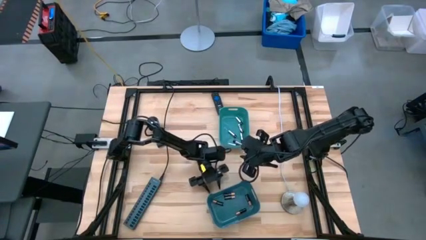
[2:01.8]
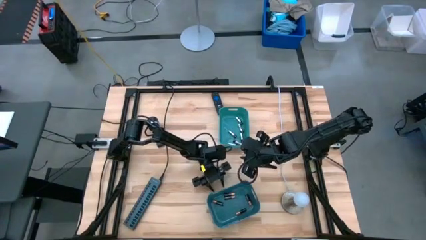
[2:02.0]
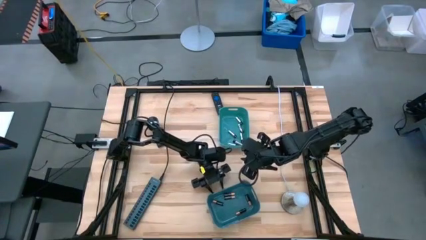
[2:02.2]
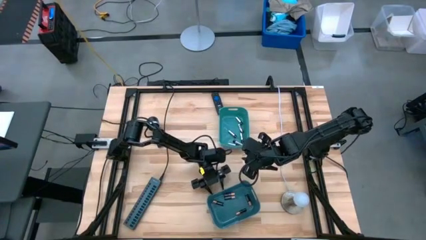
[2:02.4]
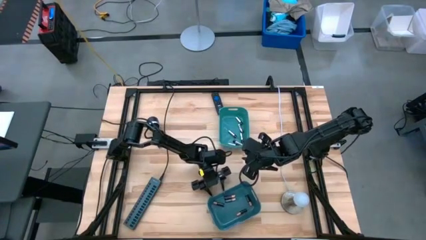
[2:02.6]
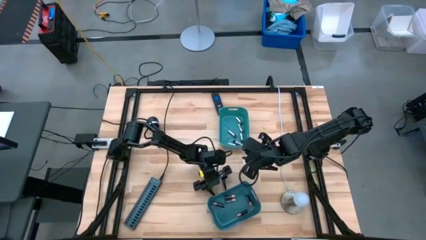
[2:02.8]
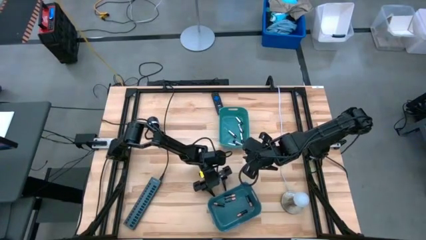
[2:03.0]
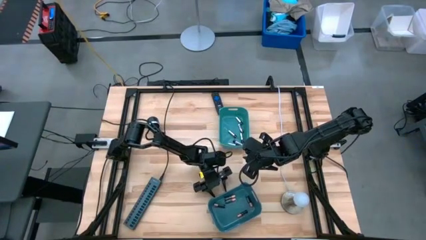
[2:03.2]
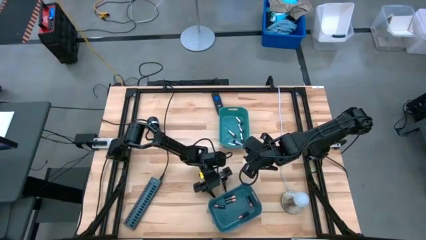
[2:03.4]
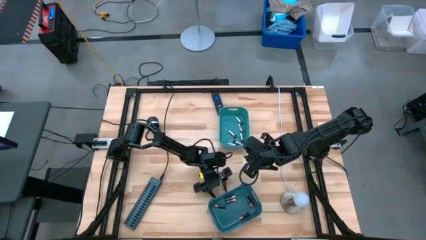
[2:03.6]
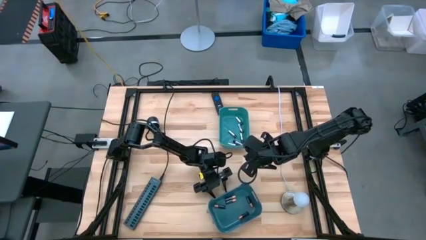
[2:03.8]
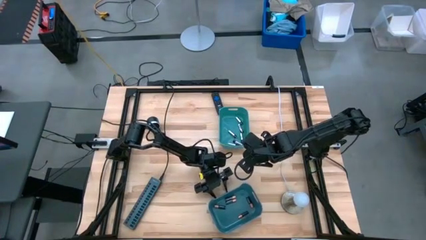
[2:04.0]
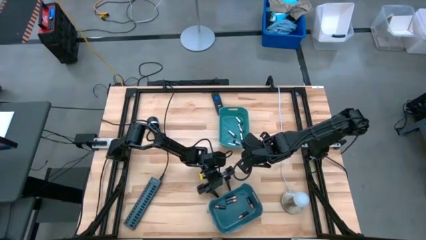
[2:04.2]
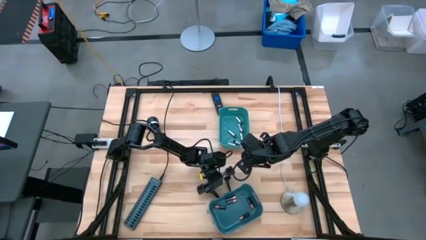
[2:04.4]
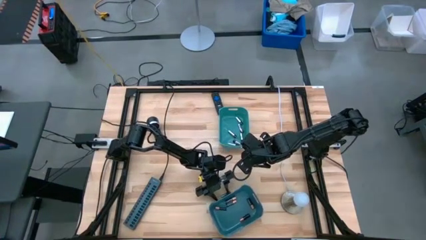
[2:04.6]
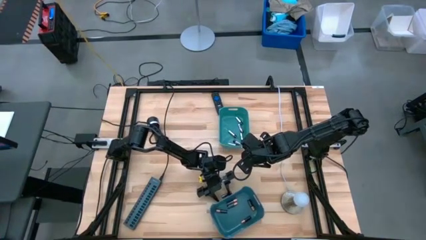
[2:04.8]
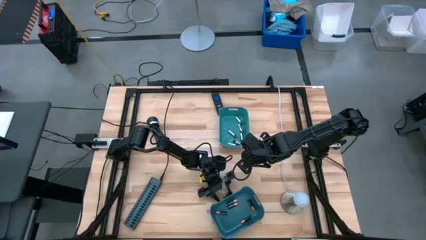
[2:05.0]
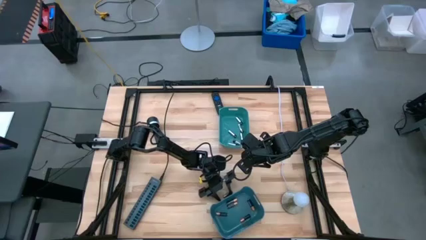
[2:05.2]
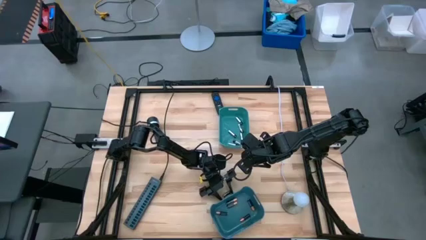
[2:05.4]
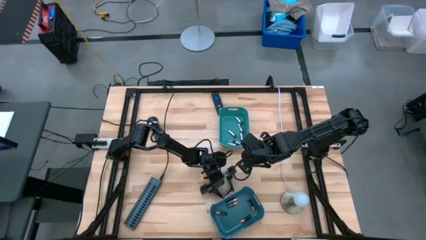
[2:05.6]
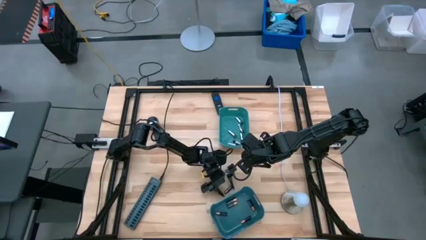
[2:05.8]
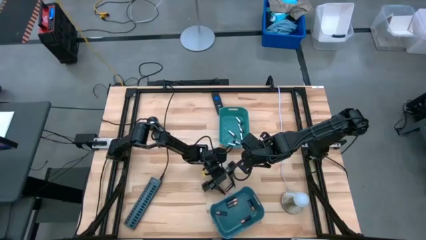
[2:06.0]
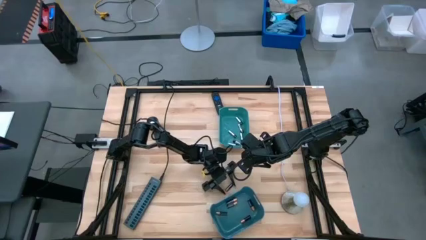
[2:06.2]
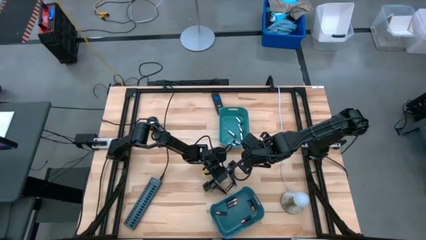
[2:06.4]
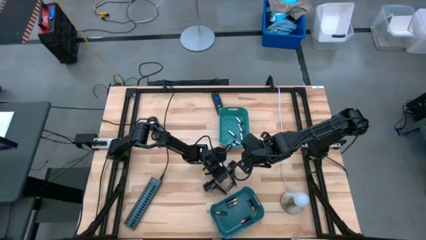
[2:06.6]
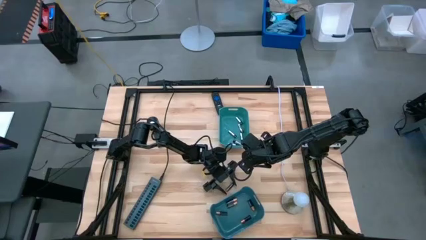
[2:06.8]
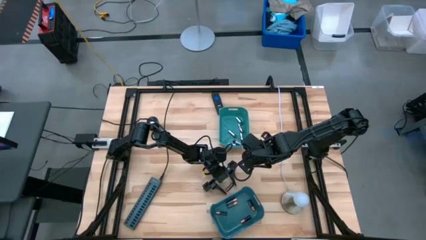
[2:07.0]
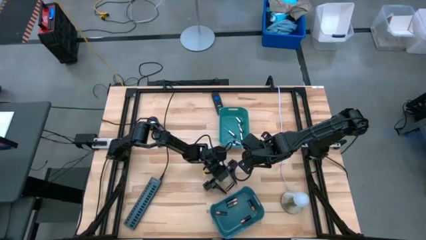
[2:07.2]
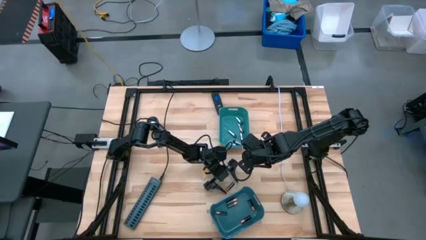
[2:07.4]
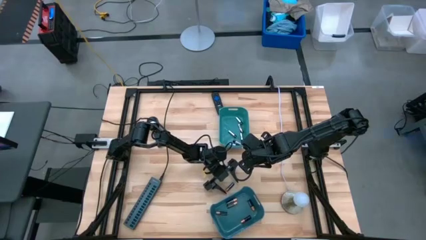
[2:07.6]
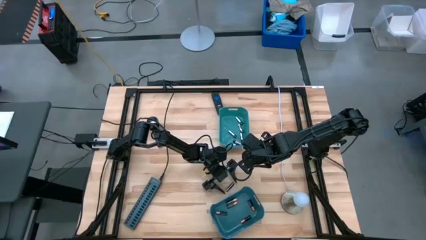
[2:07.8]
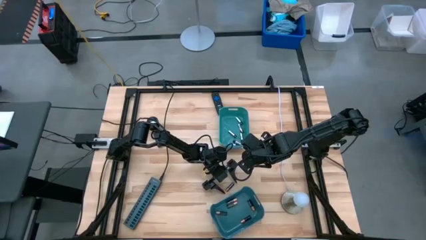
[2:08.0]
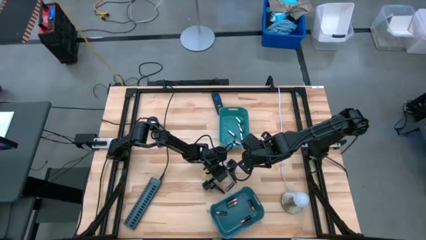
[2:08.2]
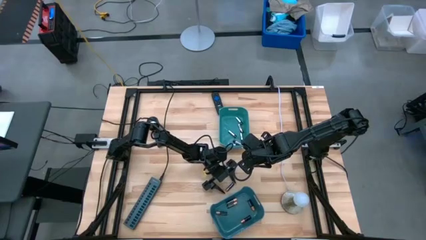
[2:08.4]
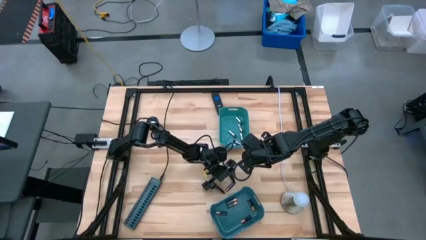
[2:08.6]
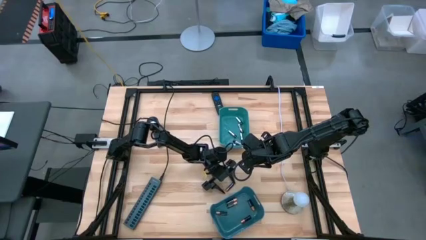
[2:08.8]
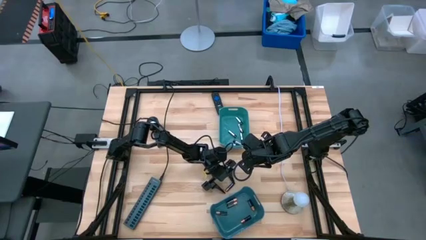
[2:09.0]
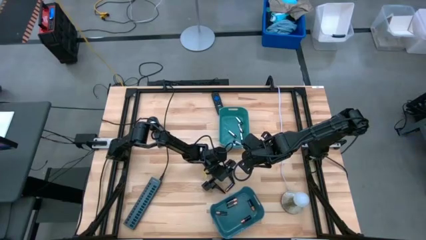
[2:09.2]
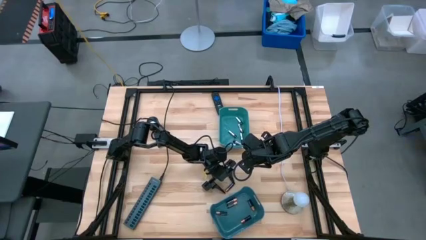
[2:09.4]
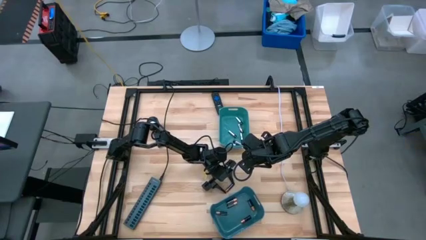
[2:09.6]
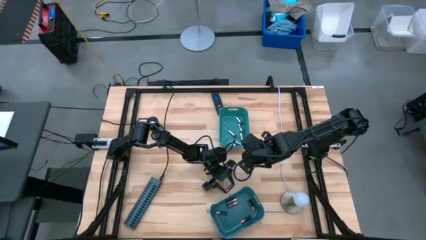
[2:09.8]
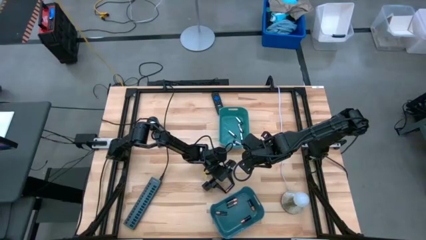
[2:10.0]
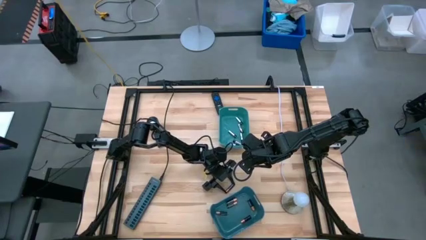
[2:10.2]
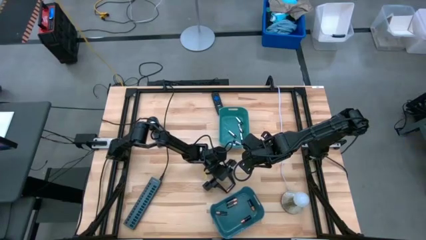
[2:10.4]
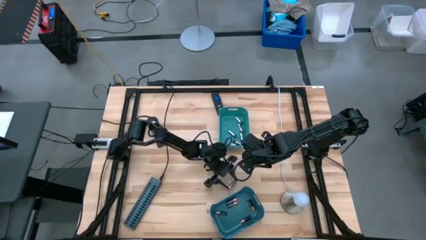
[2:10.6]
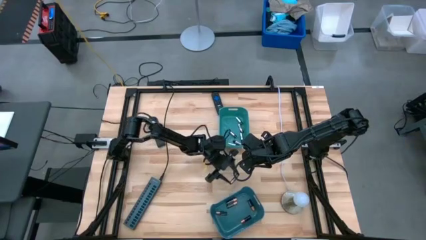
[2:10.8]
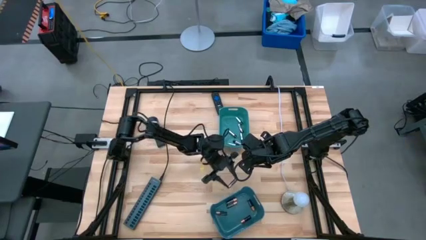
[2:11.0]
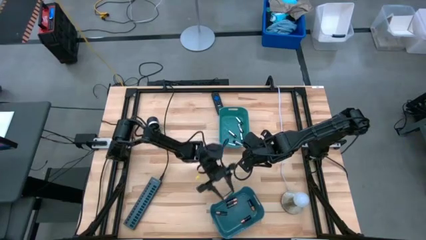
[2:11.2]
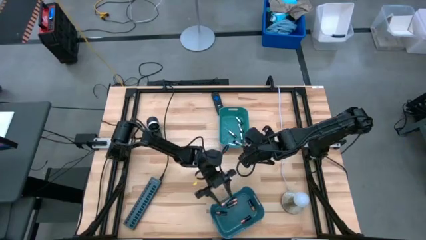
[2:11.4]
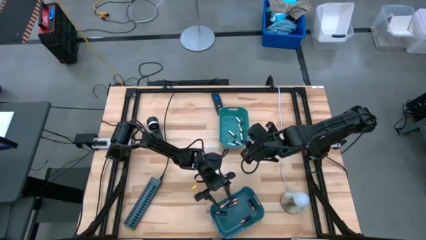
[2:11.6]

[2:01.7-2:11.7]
Task: Sort batteries
Put the black battery into the blue bin

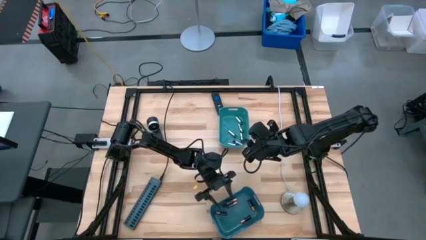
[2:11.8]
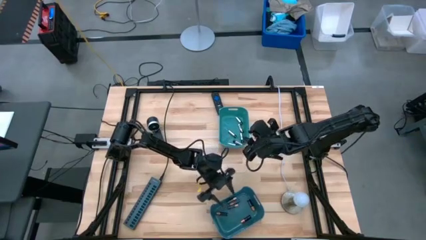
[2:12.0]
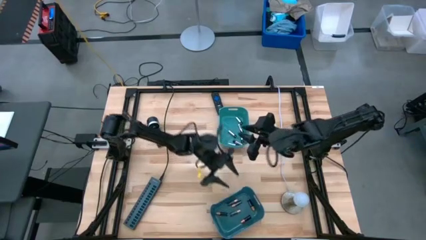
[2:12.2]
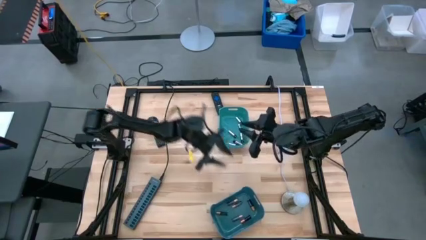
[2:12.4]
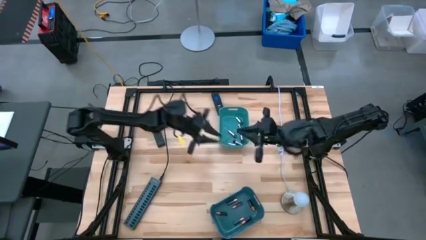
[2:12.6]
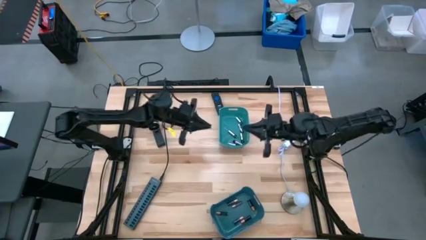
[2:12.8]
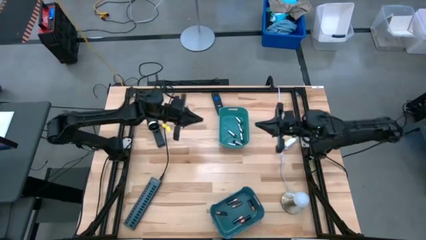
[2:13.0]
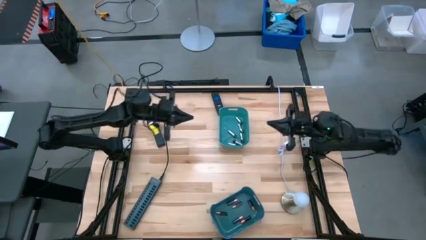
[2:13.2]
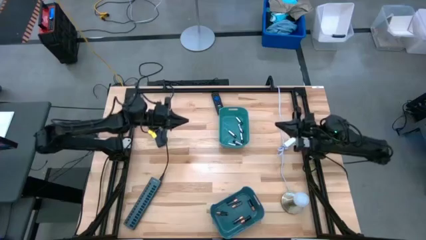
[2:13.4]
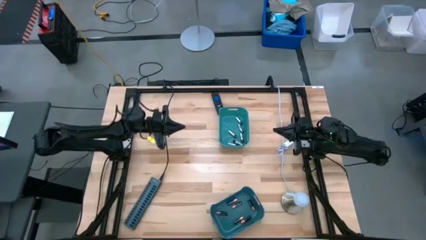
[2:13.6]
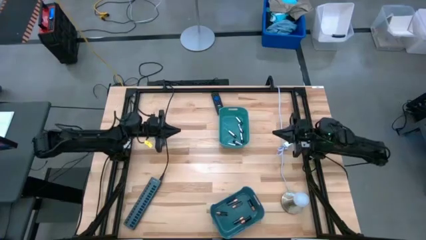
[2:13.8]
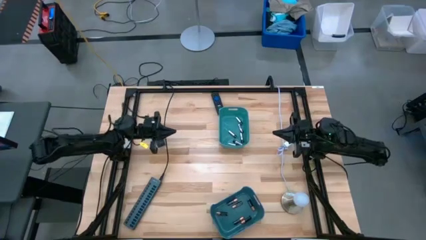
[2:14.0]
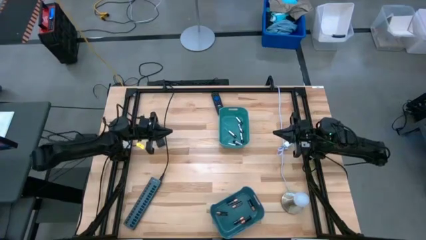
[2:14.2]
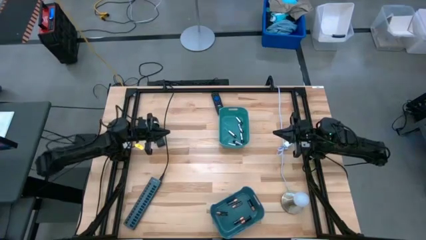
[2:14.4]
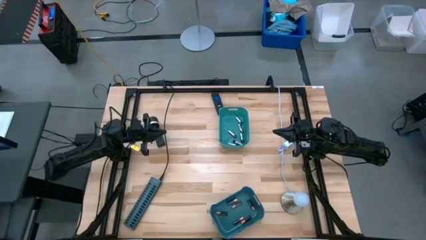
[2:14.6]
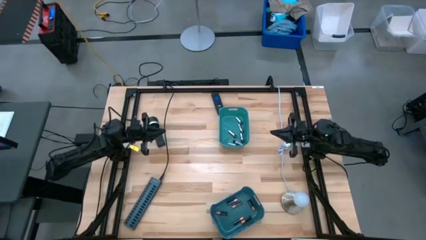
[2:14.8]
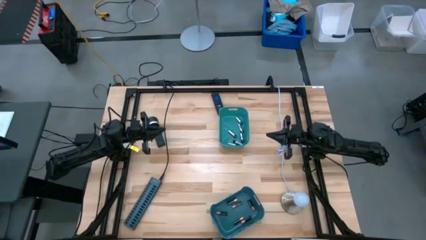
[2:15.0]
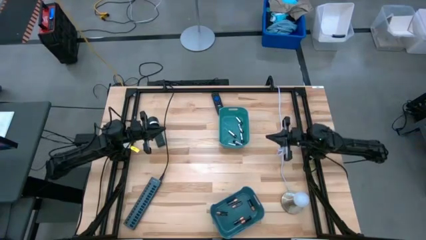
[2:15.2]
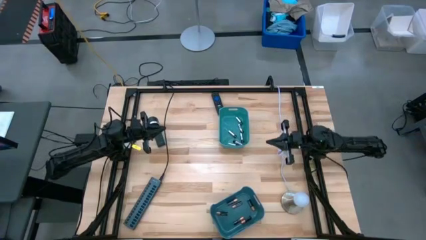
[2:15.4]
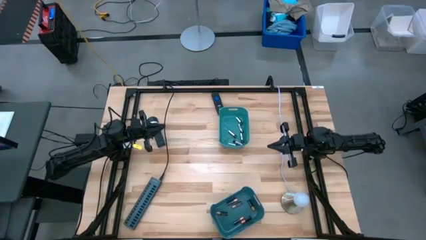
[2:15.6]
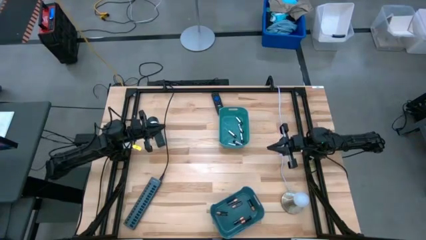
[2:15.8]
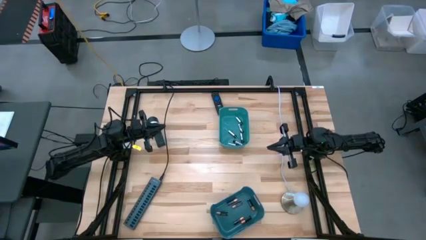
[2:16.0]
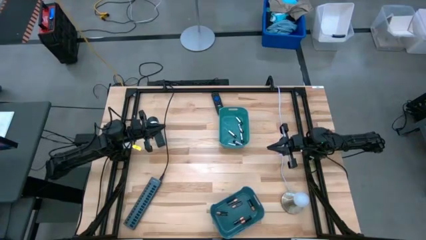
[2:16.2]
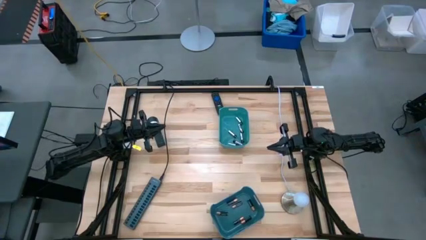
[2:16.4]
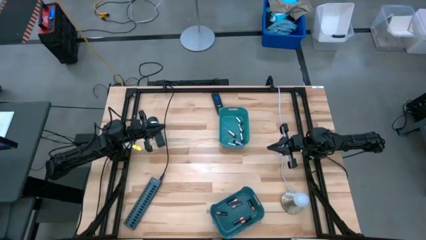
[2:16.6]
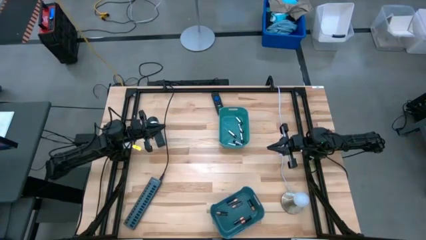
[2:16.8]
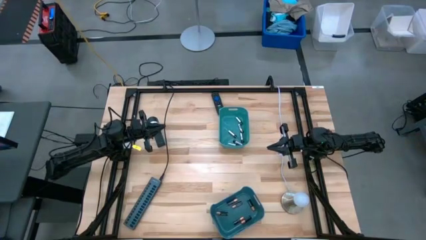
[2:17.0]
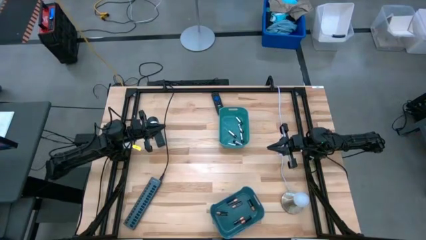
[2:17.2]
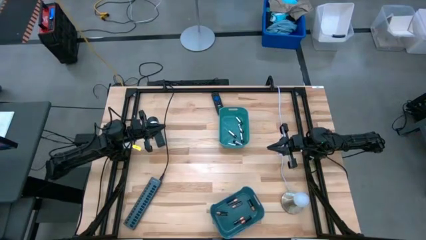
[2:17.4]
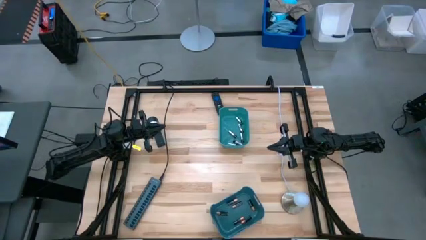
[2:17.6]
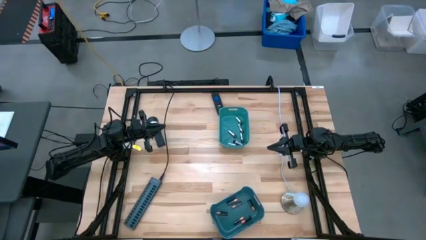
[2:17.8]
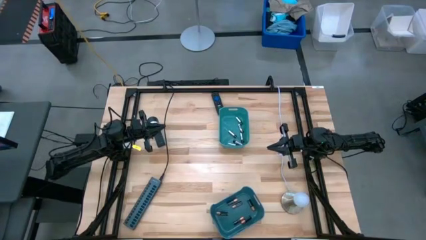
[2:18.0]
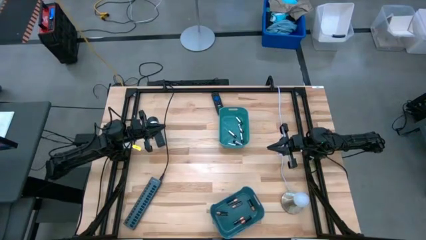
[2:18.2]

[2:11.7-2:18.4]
Return to Home Position
